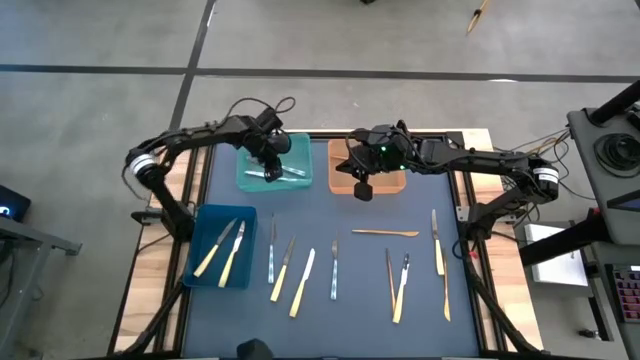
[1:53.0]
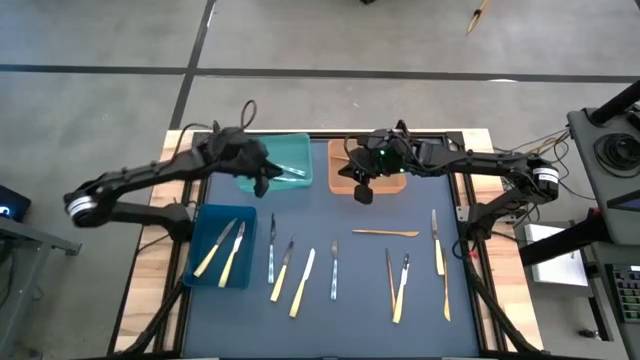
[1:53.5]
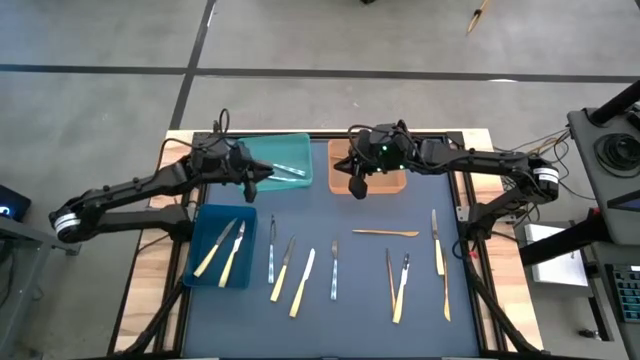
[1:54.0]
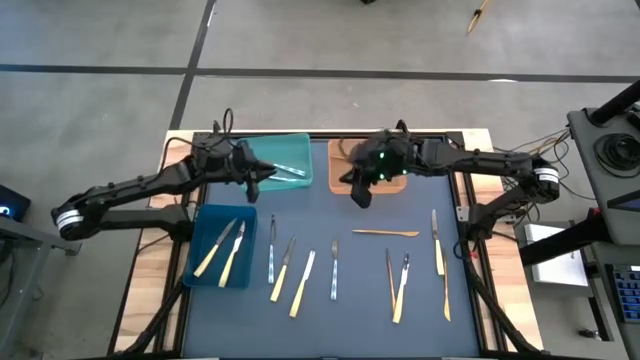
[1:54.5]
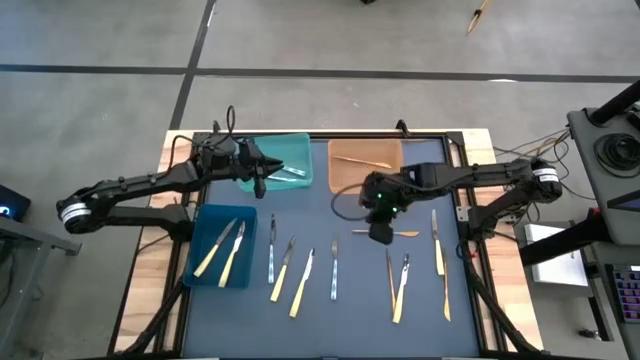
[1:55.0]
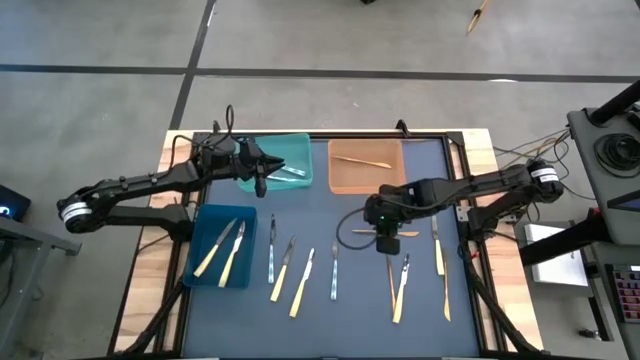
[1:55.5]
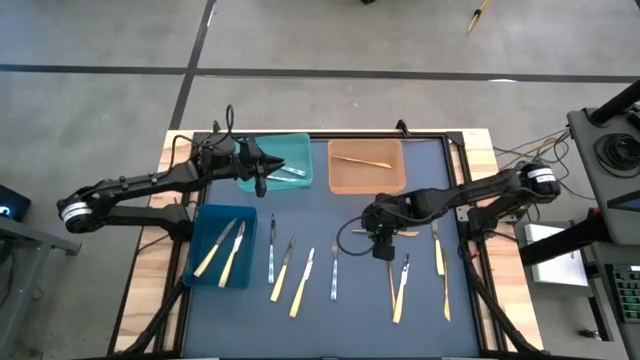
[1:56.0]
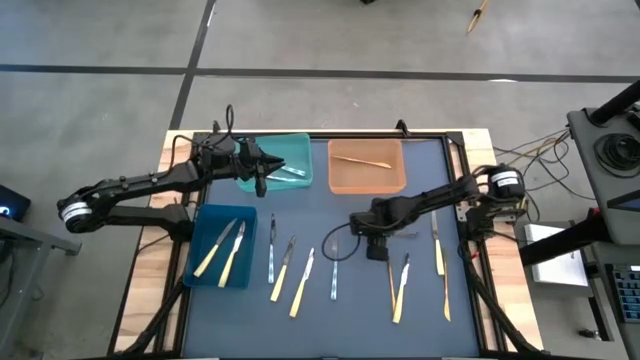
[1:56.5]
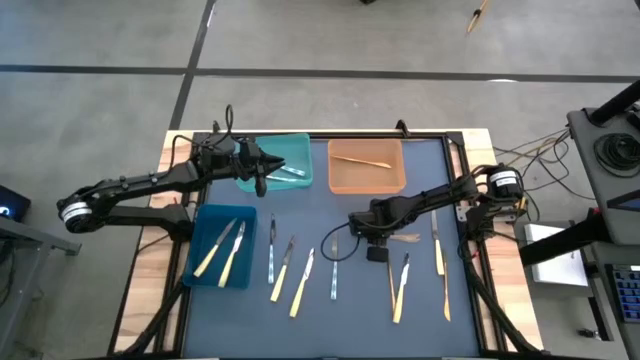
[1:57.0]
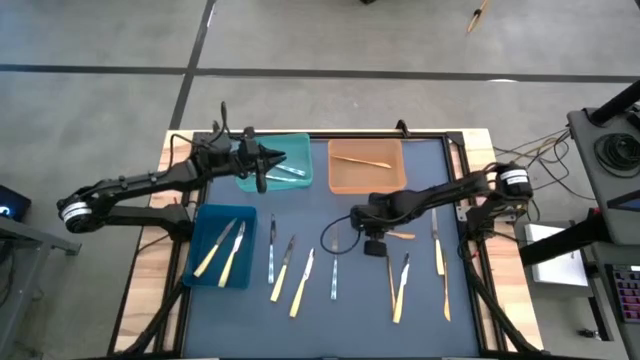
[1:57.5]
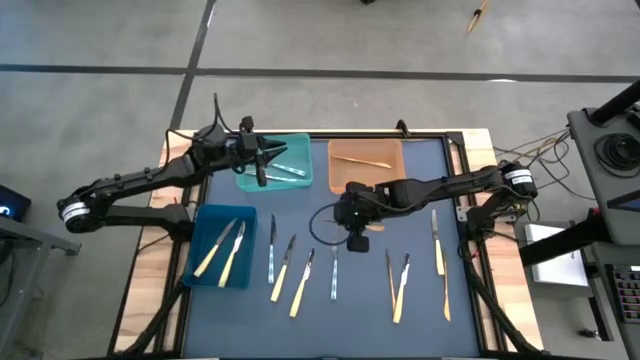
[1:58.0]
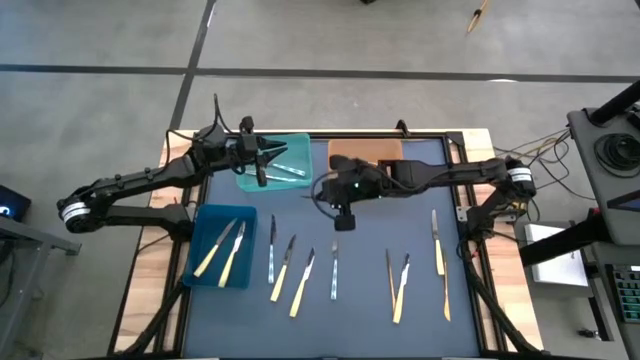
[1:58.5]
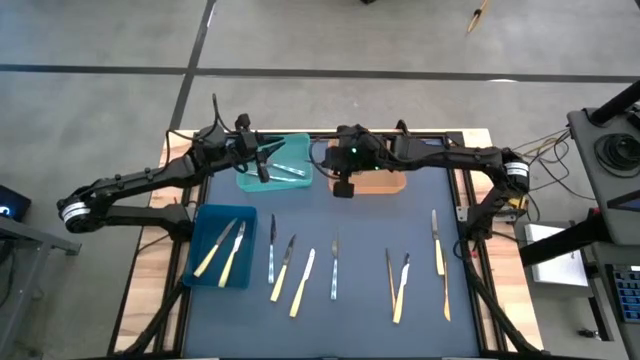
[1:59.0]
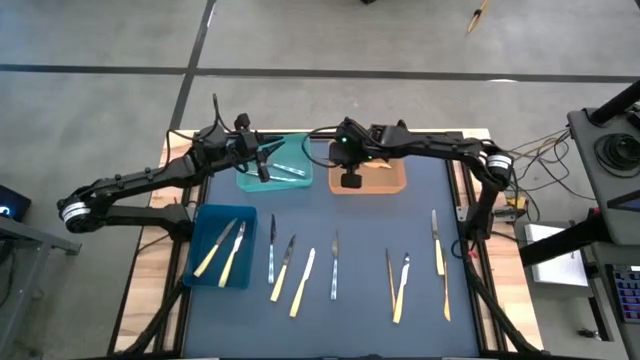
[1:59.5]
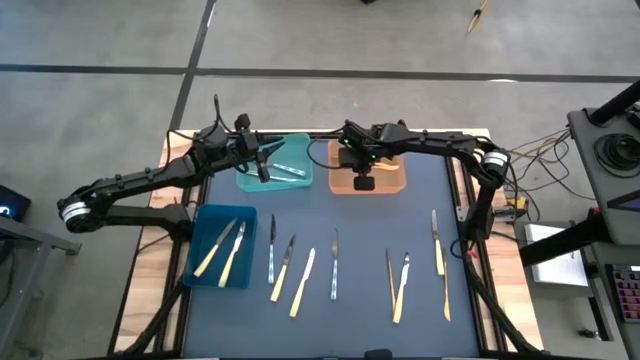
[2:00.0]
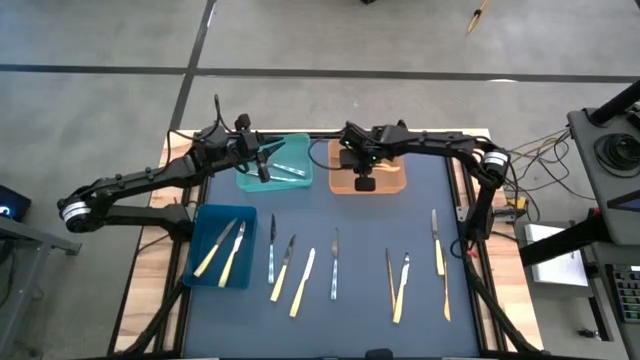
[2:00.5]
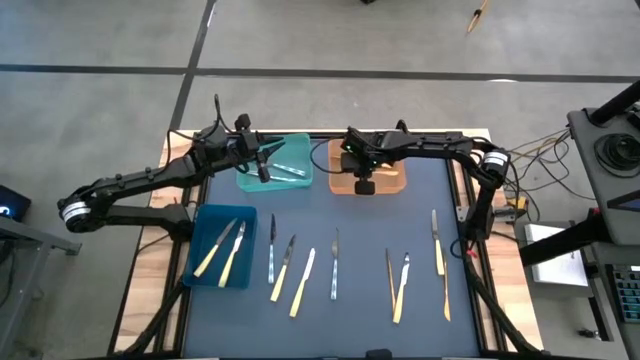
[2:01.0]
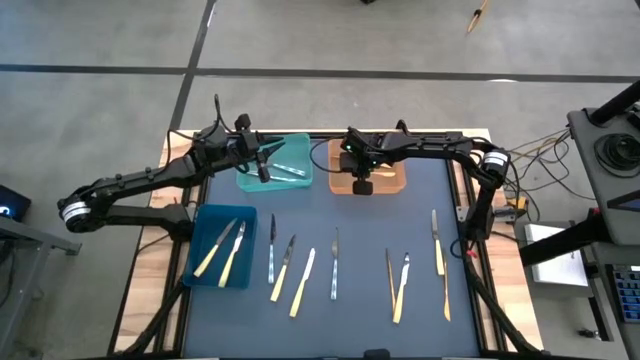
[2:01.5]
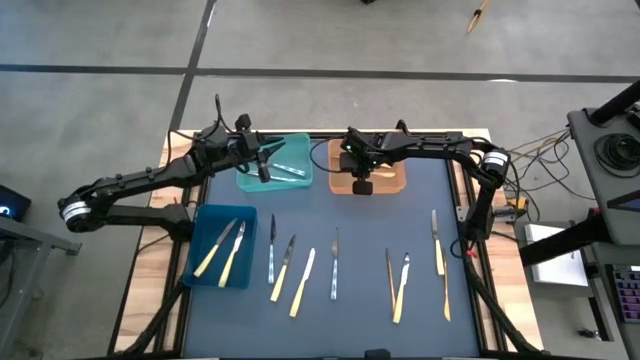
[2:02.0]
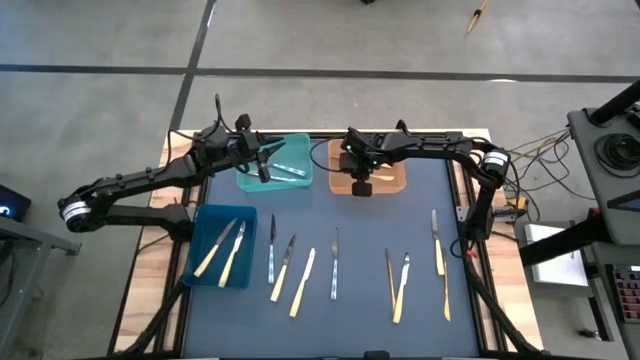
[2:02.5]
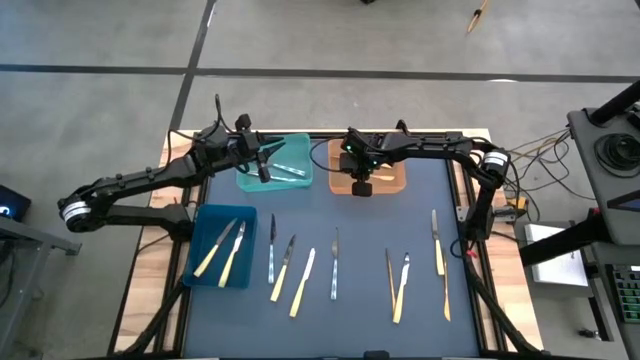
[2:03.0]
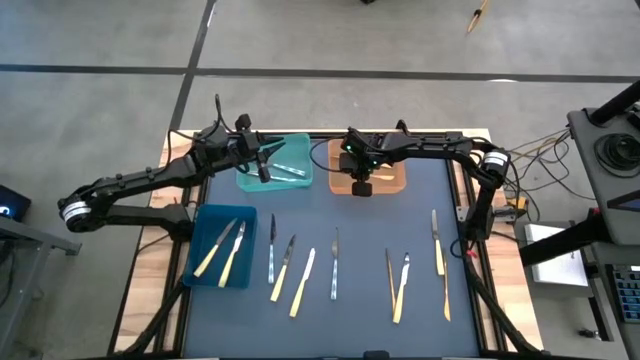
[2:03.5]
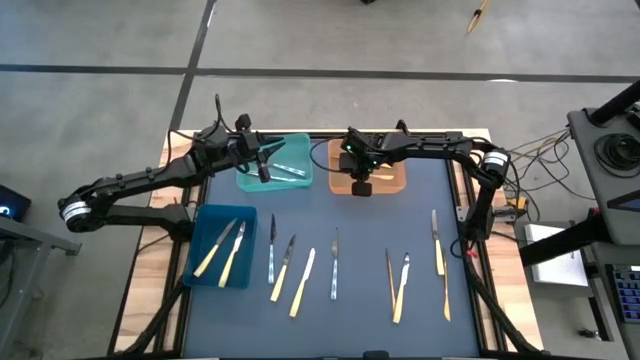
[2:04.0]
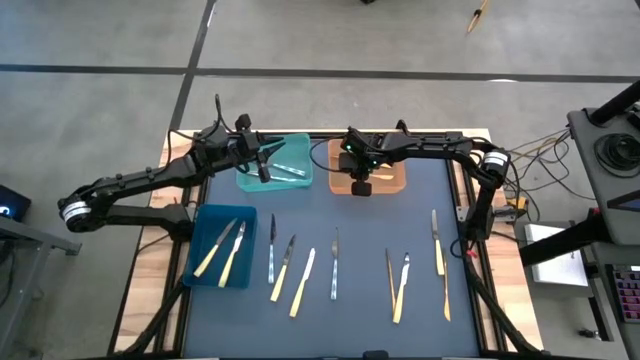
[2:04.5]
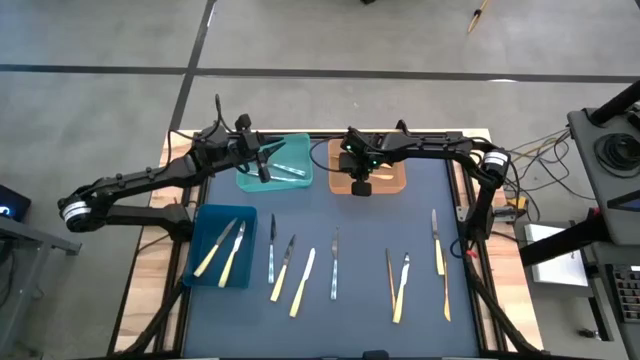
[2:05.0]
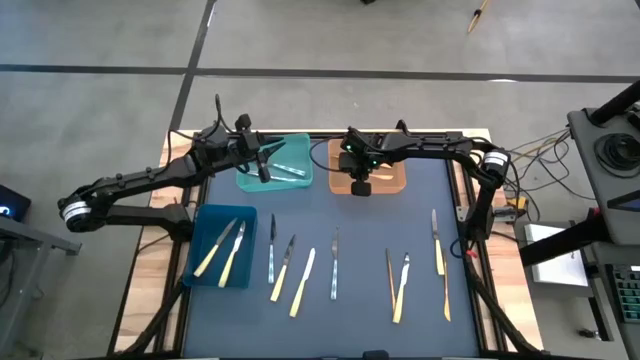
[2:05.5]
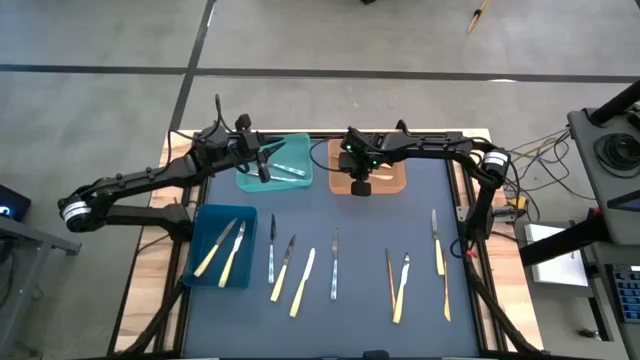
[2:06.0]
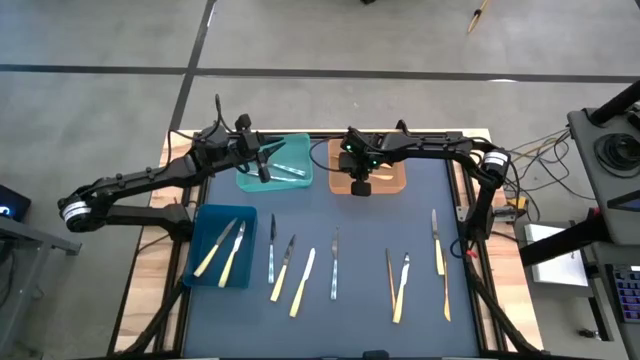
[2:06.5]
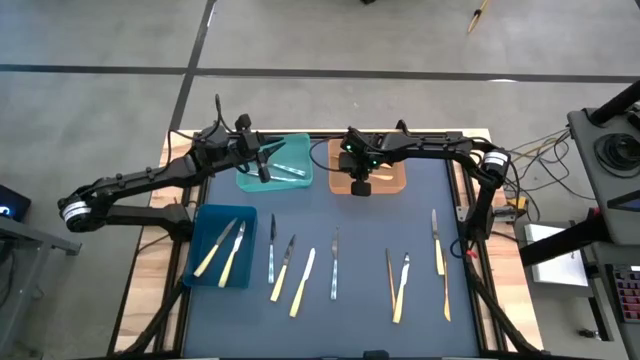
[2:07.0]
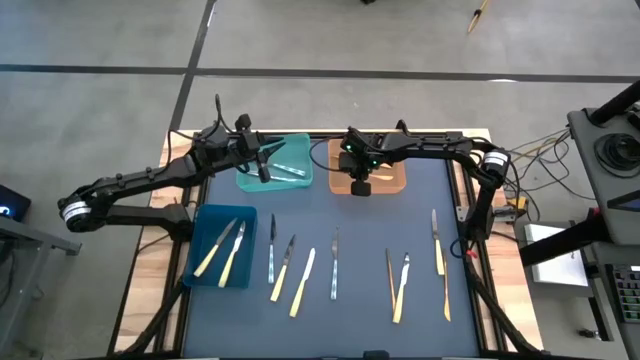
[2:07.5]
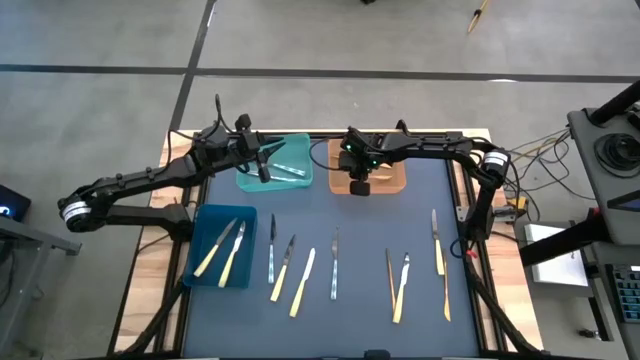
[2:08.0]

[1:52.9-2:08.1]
Task: Sort silverware by color (type)
Put the golden knife into the orange bin

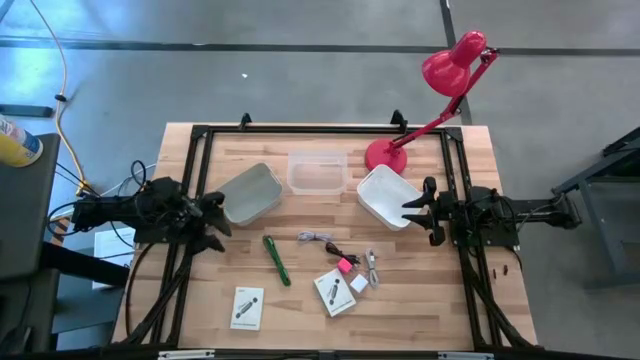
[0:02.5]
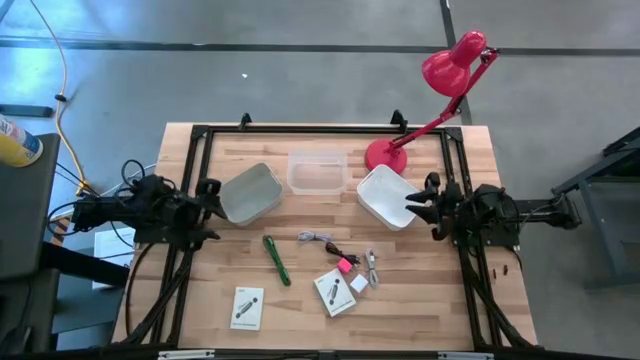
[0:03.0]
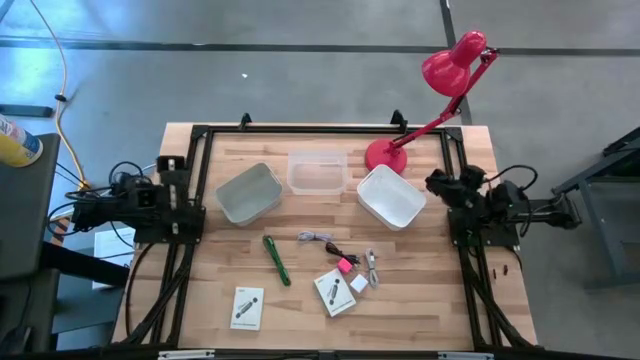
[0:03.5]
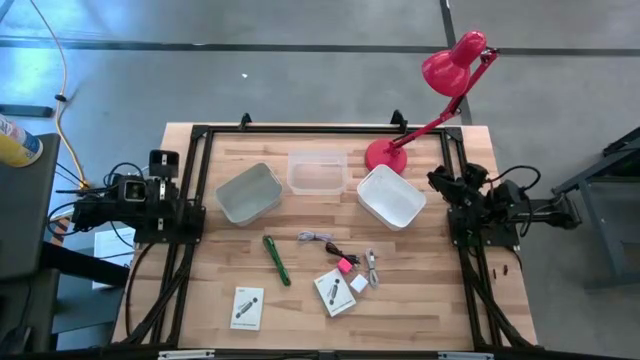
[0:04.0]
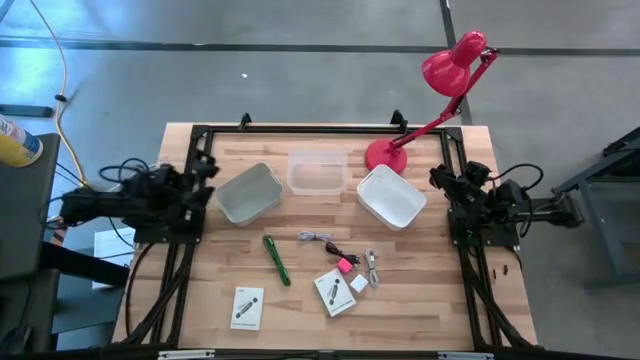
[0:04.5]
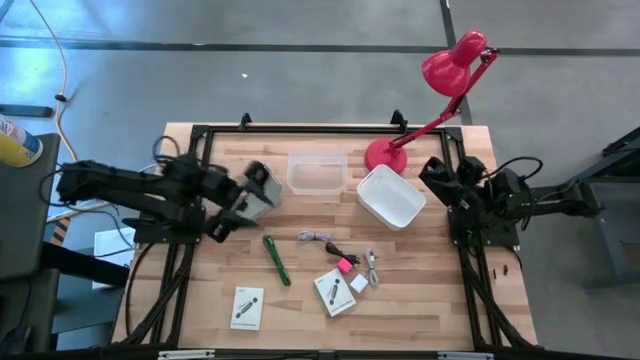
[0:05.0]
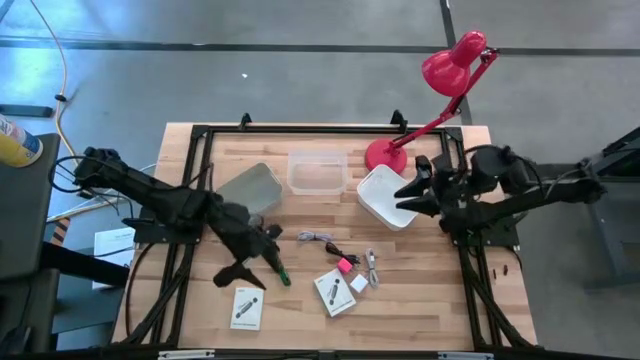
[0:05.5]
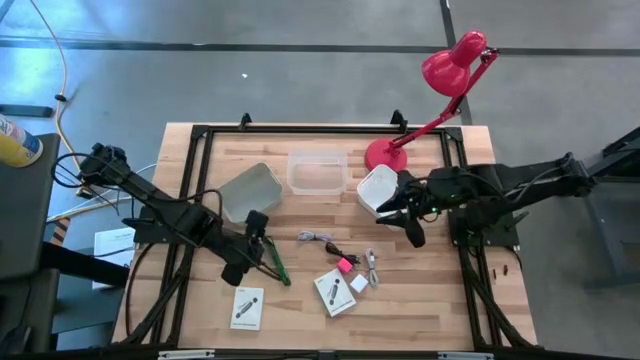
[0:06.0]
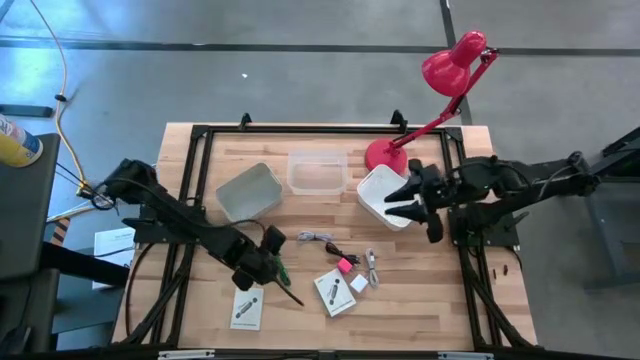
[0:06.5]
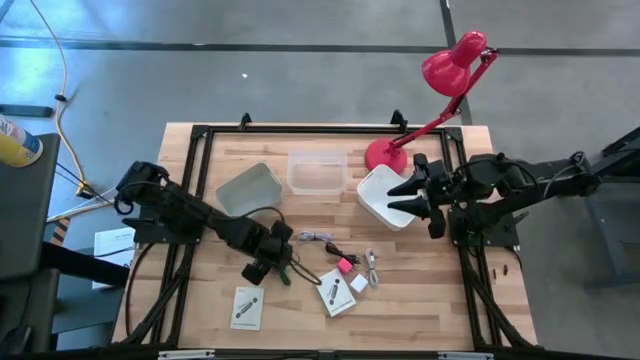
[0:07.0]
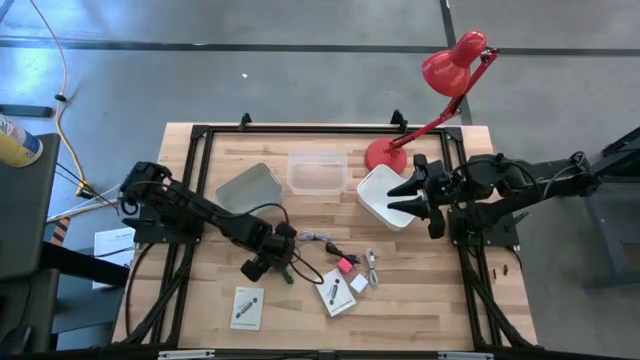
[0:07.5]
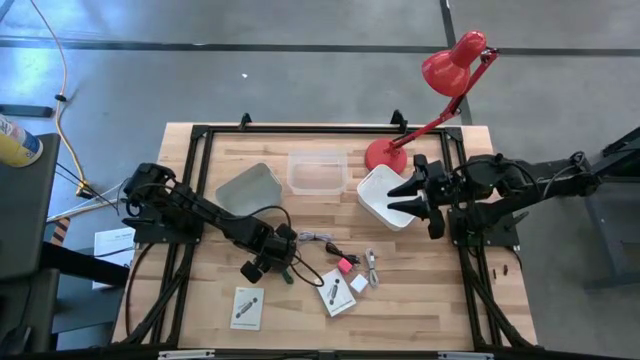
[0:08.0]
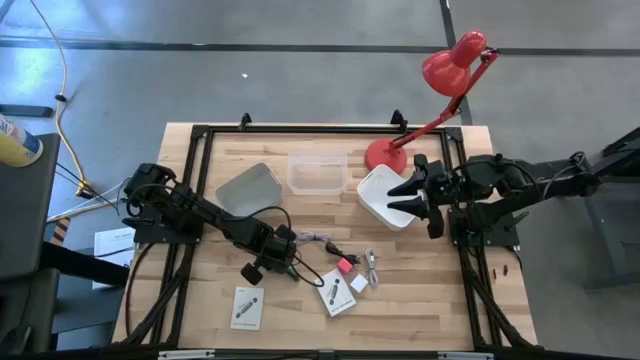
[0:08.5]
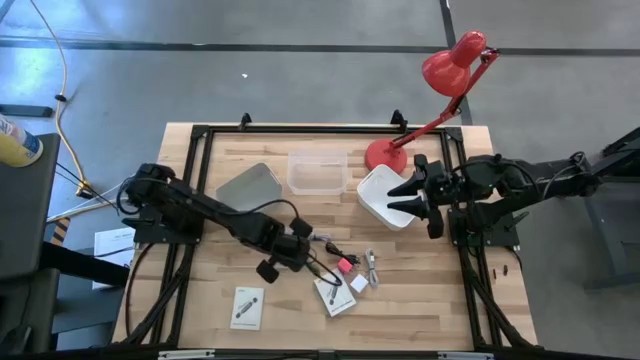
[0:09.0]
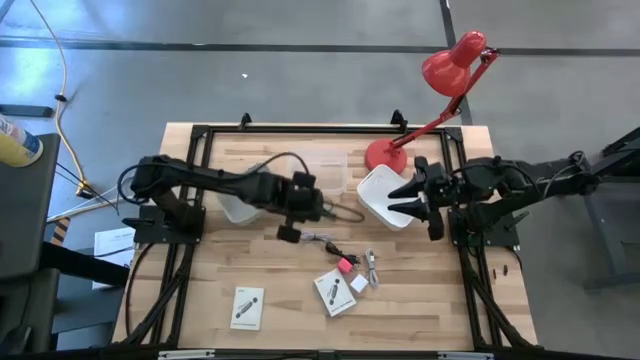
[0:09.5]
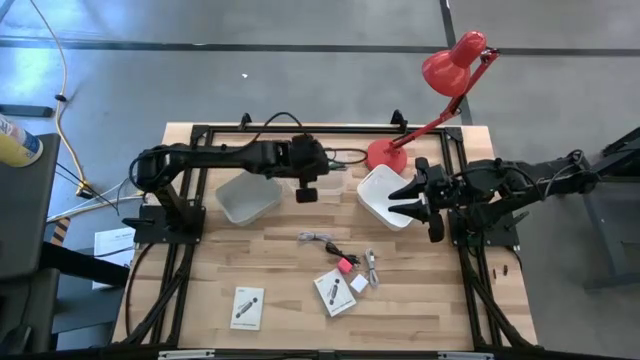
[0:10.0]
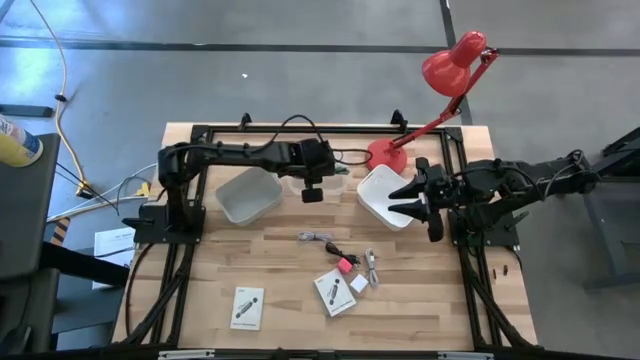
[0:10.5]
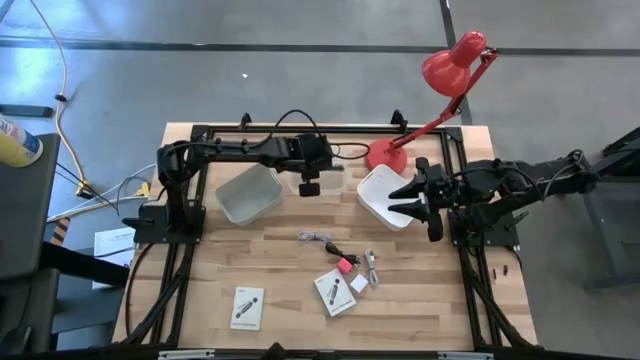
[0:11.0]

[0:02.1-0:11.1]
Task: Pick and place items into bin
Put the green charger cable into the transparent bin
